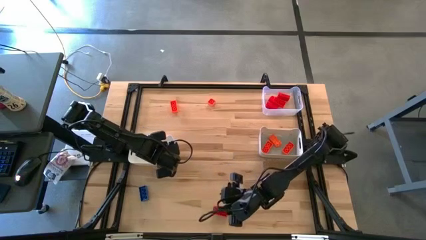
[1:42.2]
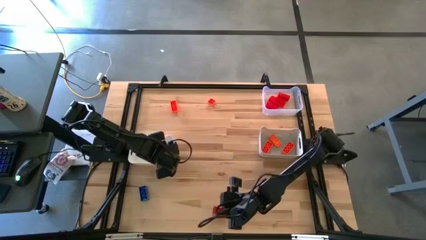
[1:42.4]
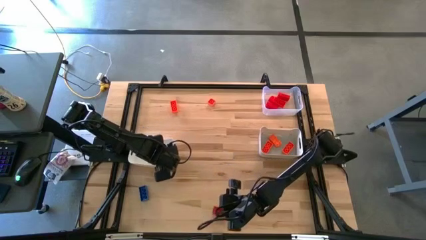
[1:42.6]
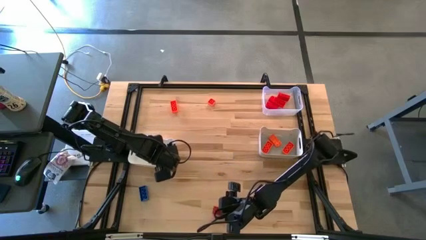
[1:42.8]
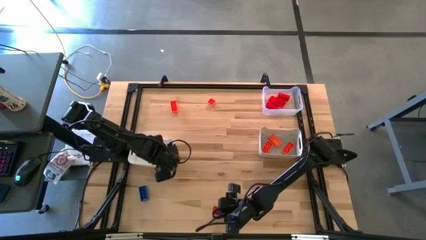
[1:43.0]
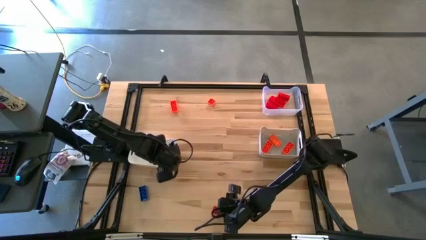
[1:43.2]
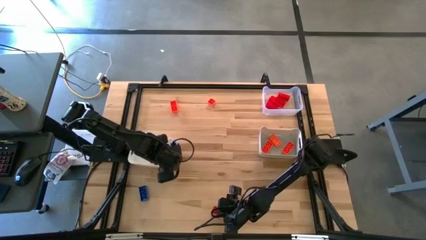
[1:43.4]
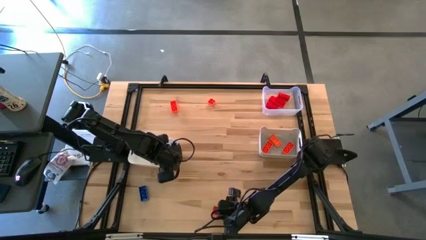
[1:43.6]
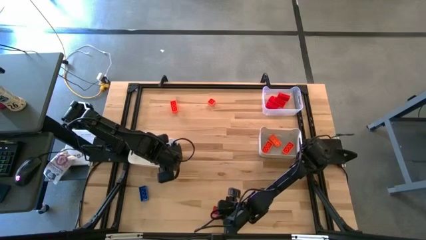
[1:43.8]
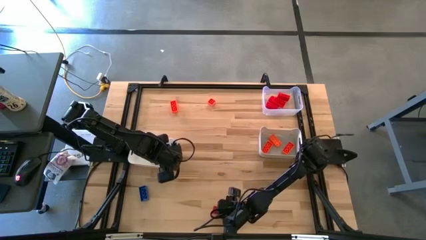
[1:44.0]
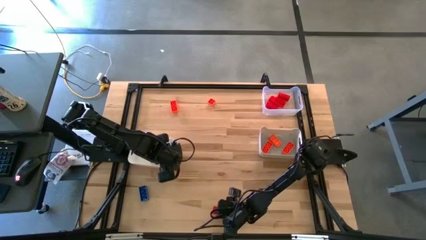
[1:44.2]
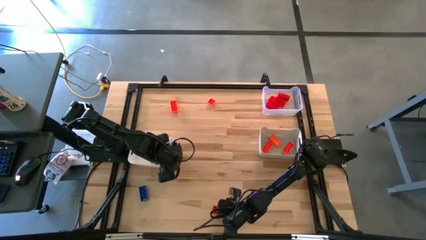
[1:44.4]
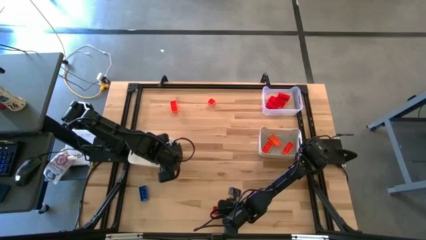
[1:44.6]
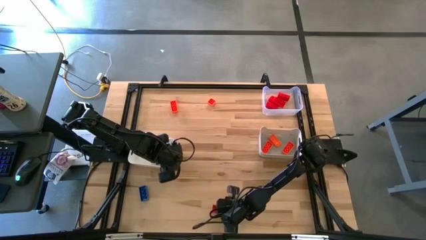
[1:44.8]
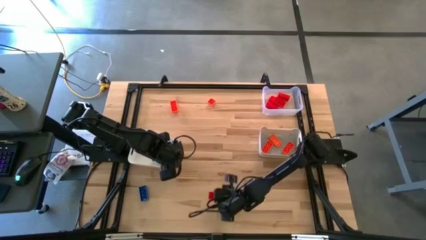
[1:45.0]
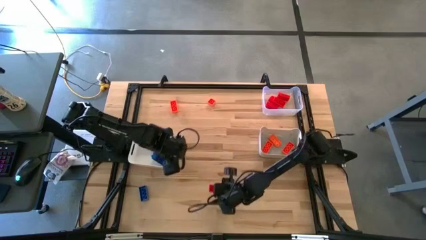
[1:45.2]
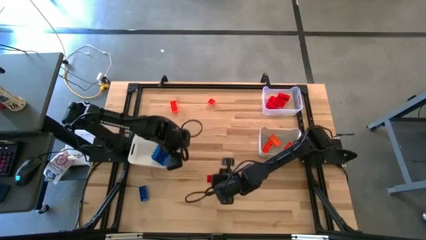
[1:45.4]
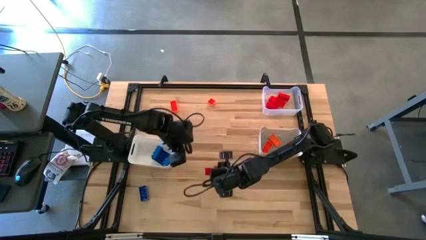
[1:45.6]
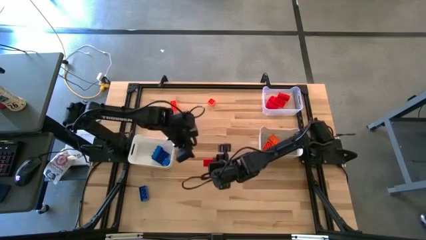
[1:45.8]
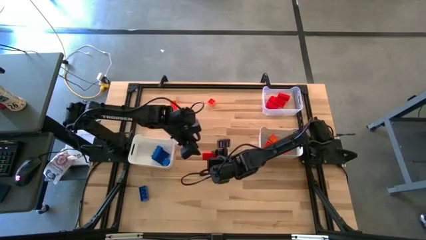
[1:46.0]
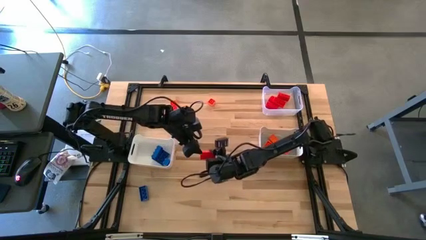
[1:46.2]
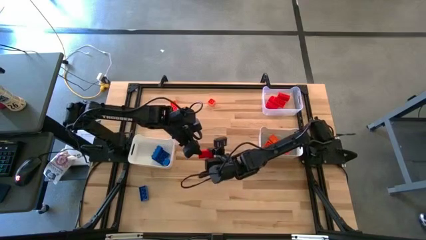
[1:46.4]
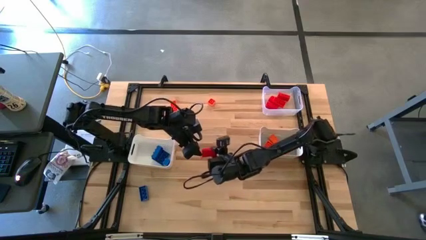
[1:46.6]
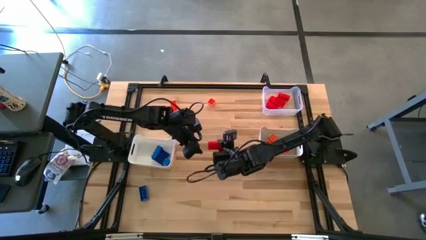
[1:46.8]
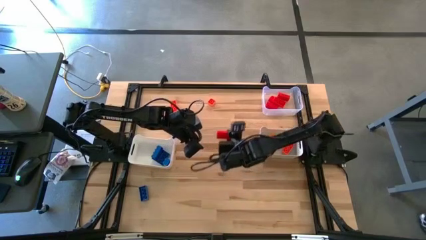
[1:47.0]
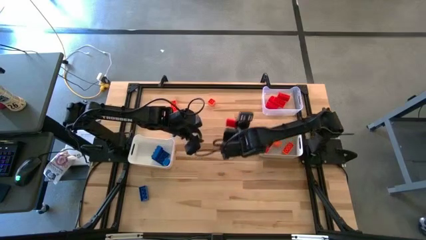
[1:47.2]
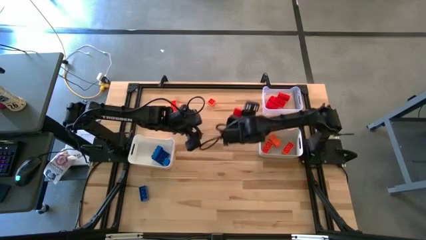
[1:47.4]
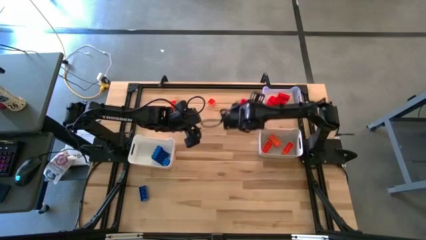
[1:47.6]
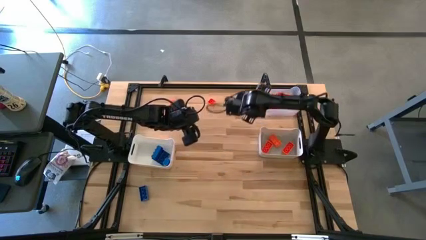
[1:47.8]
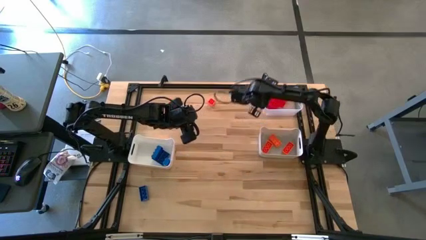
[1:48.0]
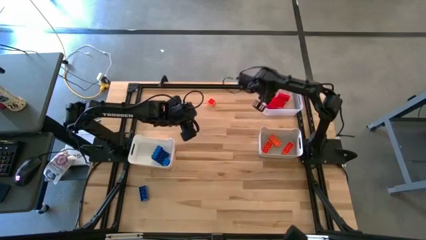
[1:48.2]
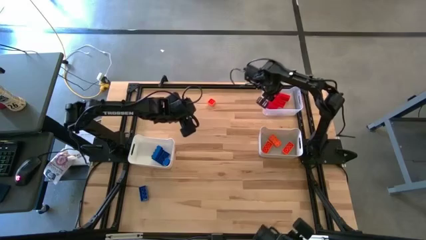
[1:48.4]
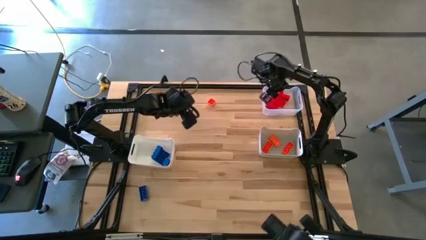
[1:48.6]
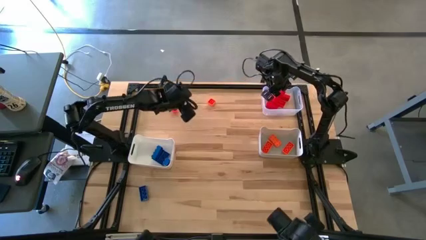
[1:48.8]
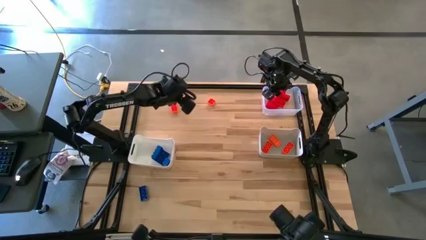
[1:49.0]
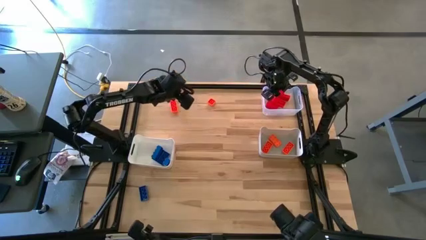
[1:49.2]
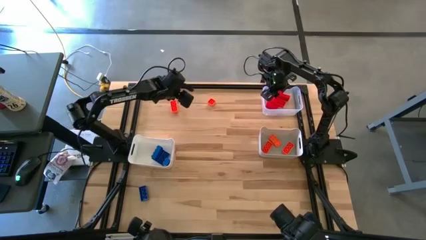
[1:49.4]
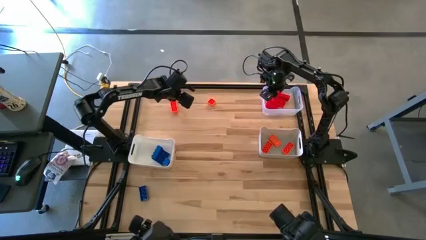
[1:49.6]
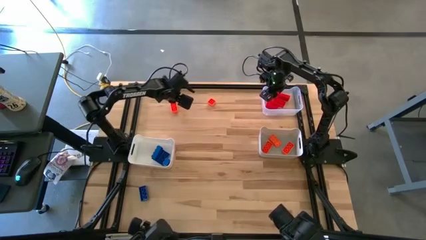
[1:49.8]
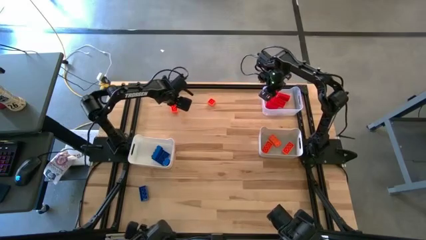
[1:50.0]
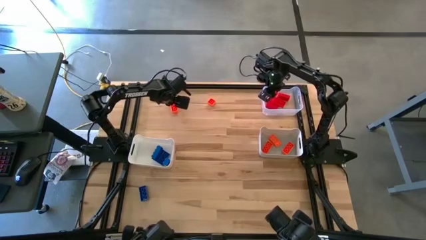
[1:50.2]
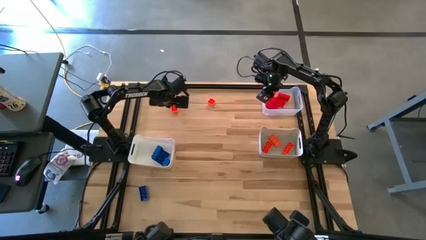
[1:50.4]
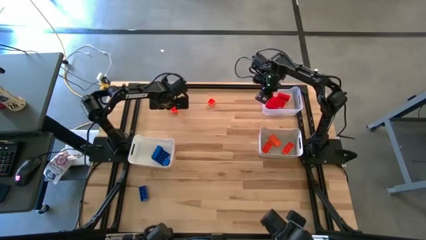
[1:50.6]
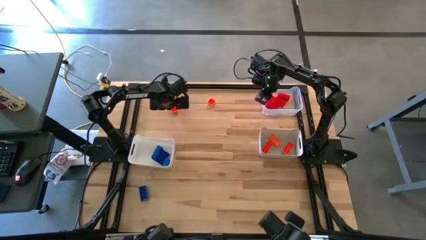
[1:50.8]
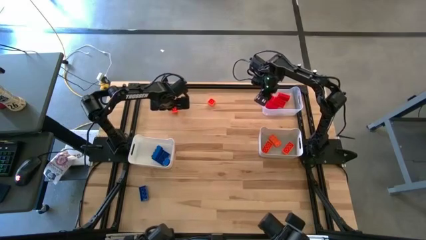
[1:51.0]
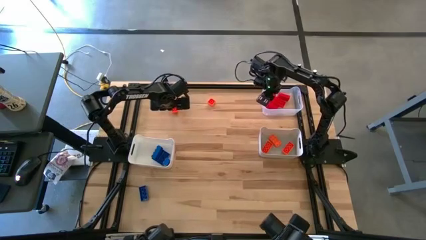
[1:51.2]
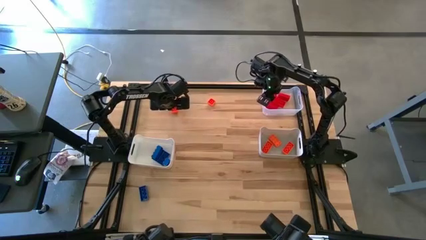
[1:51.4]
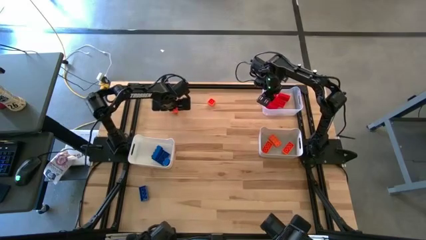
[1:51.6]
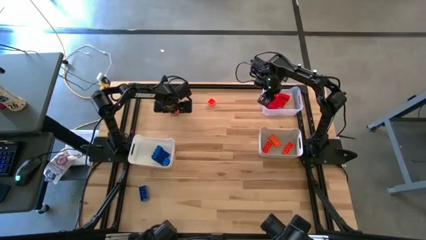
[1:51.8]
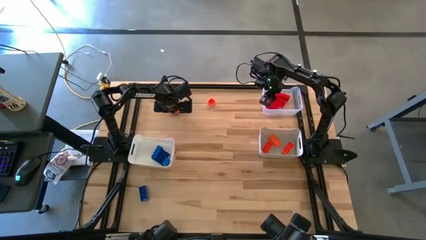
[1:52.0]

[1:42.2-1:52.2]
Task: Sort & place blocks by color
Put the red game piece into the transparent bin

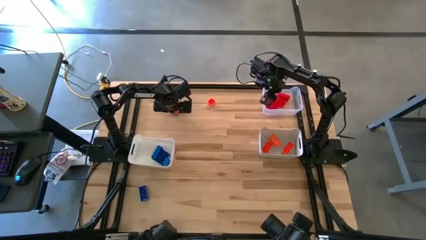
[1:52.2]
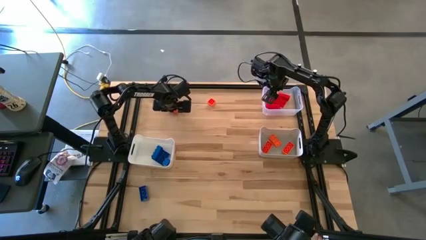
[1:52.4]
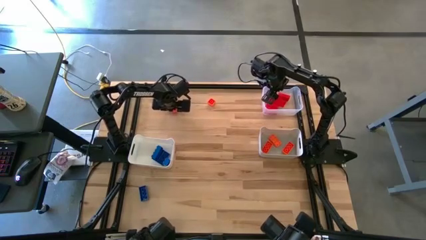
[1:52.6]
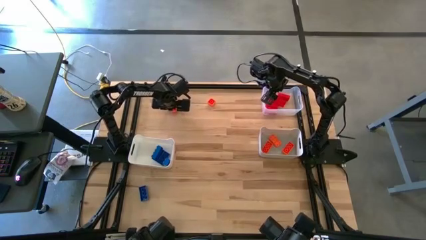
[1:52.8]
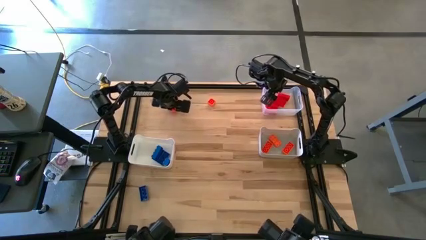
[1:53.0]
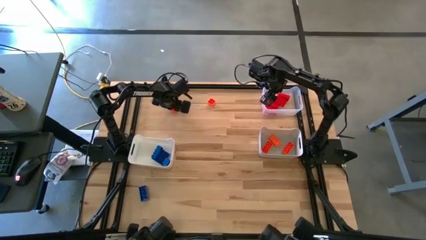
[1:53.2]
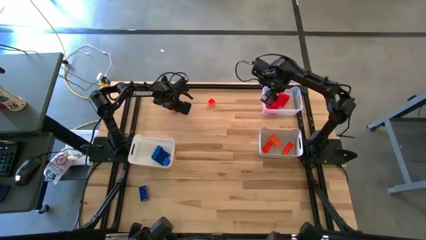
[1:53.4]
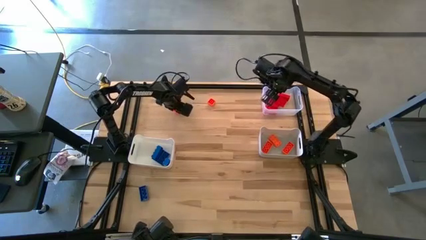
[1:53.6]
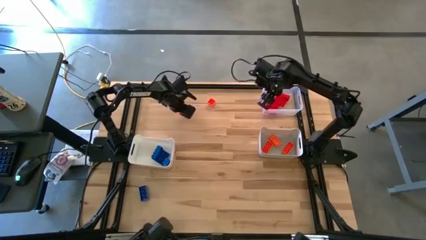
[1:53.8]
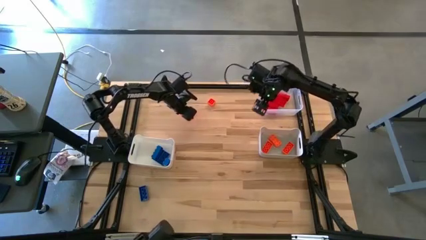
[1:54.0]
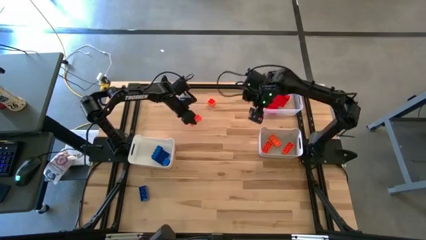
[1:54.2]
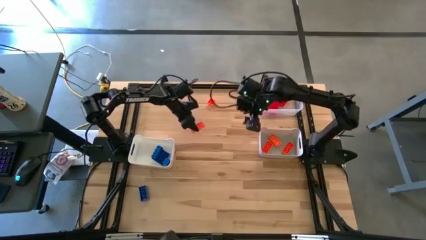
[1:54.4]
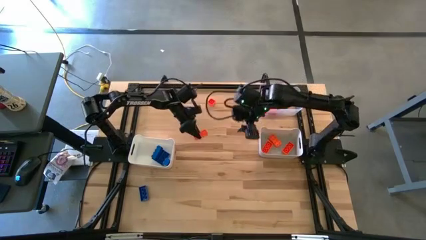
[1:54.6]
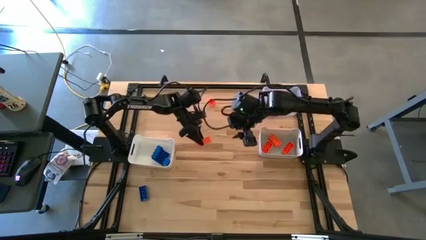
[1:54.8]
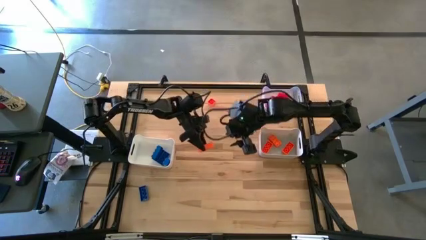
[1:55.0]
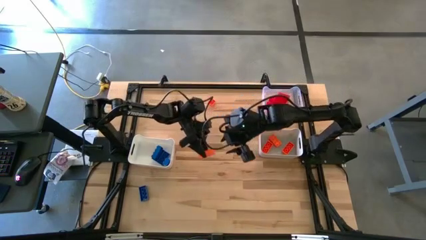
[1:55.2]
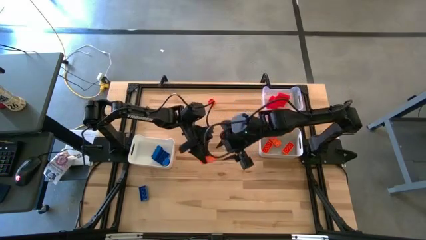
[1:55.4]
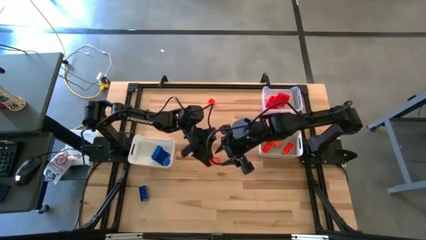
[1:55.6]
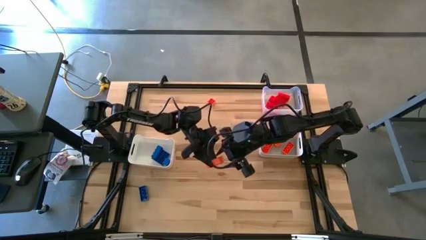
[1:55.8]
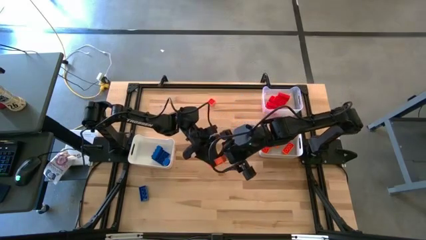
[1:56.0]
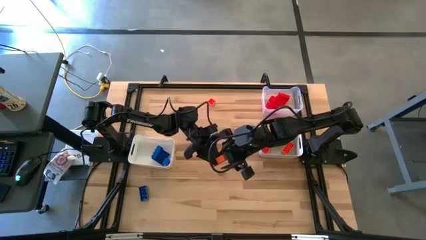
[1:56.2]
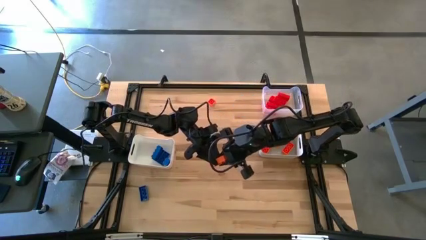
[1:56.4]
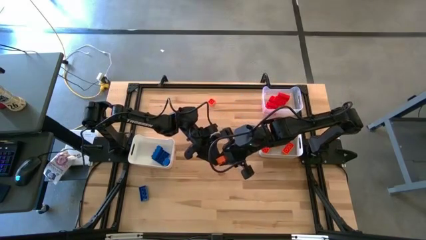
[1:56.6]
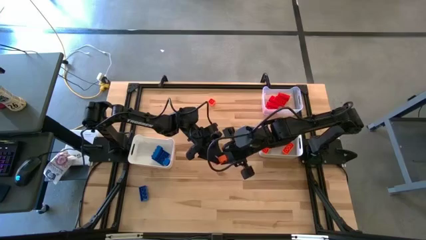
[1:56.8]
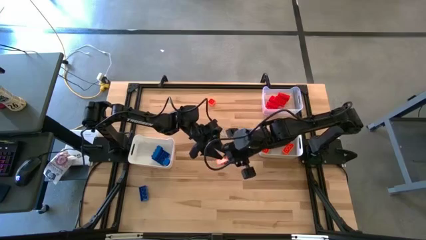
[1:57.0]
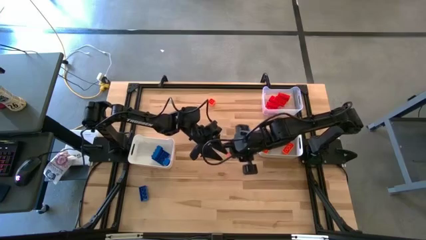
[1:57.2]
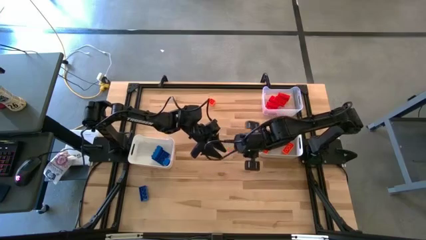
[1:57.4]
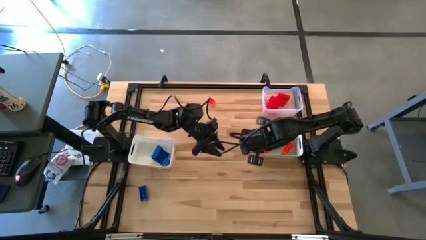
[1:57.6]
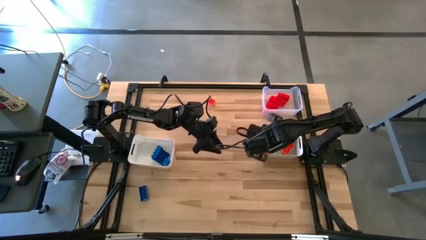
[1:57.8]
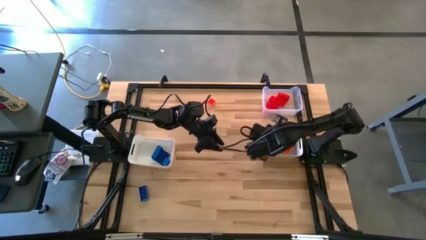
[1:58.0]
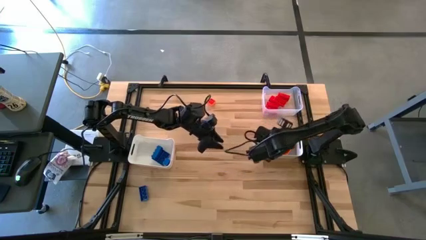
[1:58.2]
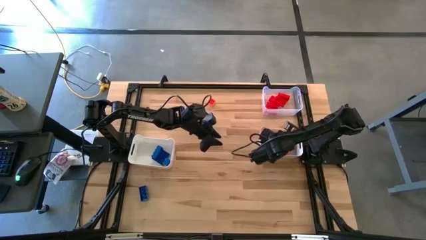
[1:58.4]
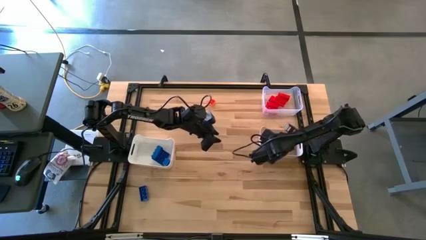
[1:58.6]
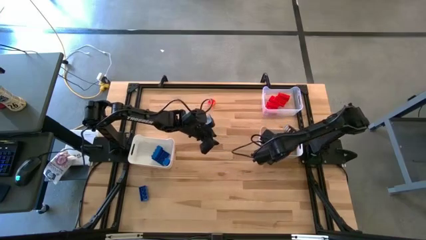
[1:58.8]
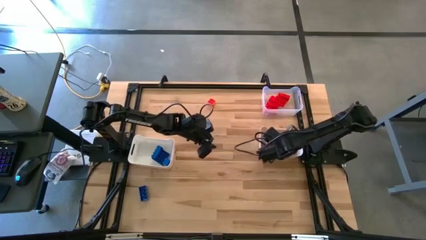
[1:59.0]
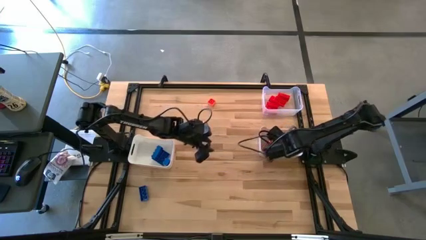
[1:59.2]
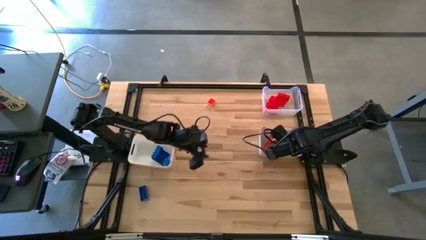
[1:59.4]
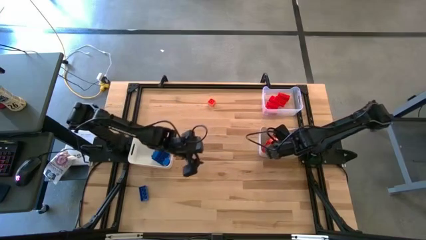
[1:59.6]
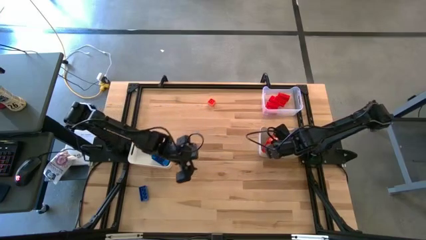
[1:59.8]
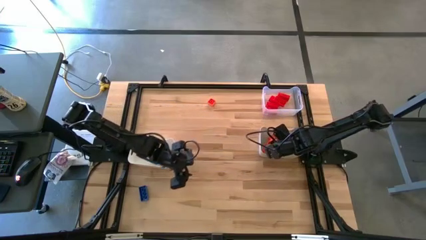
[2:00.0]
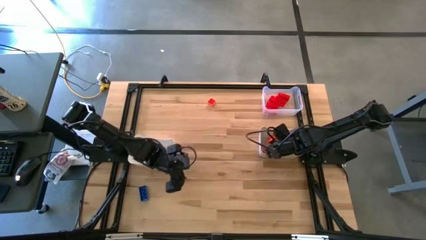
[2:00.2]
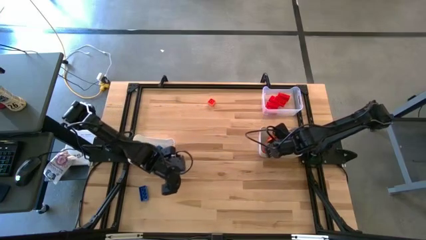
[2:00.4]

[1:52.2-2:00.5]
Put the orange game piece into the gray bin
